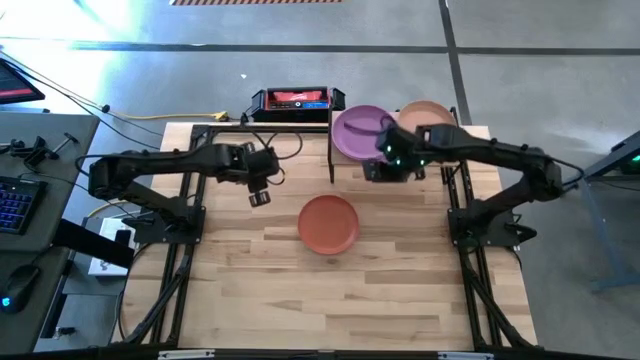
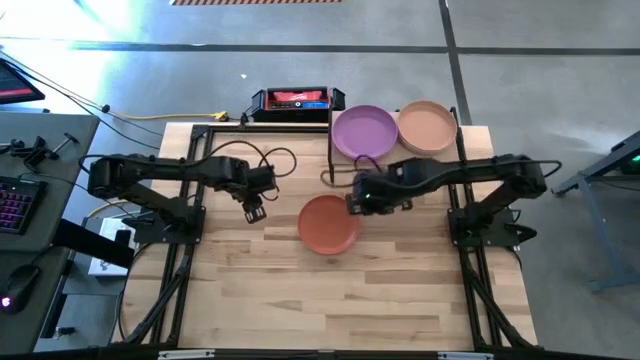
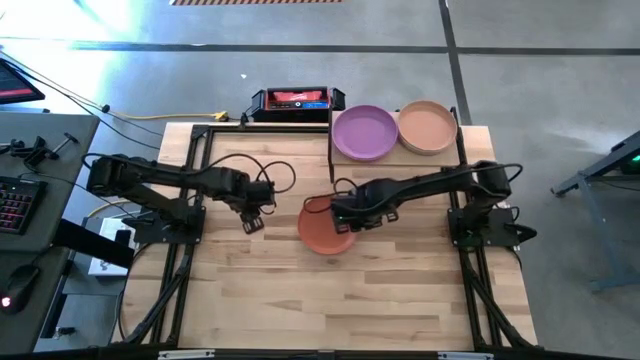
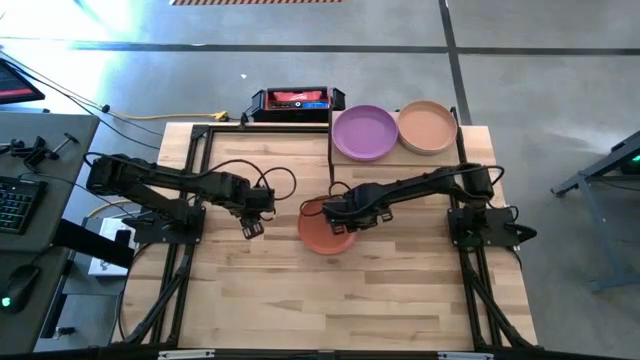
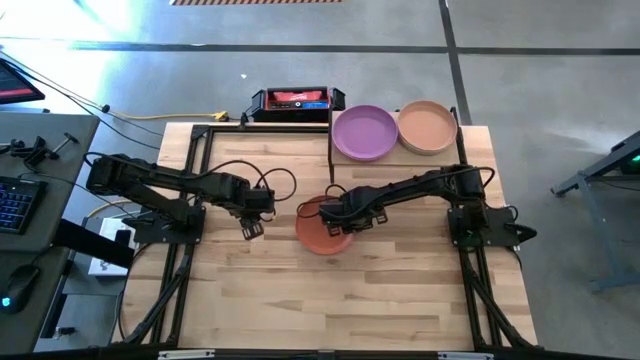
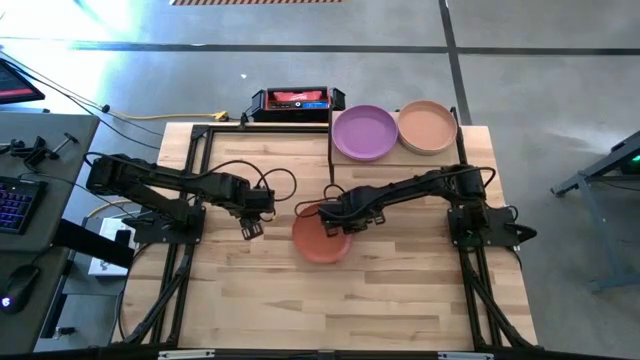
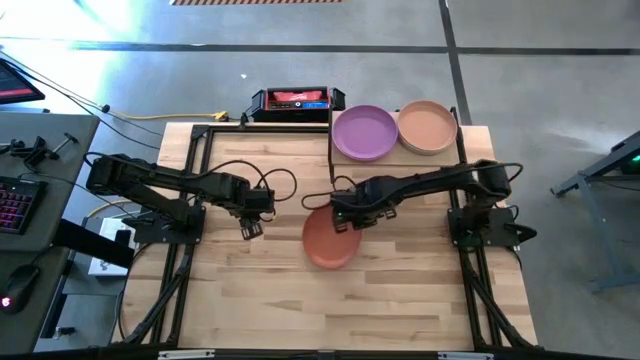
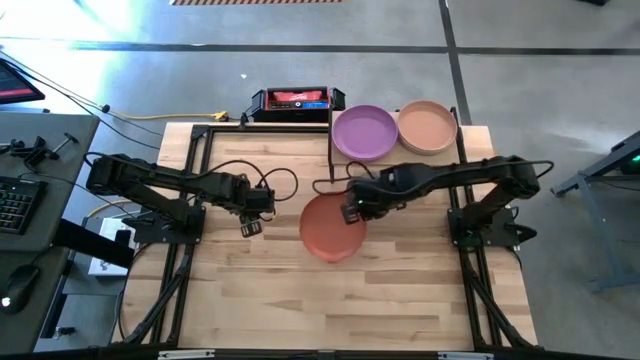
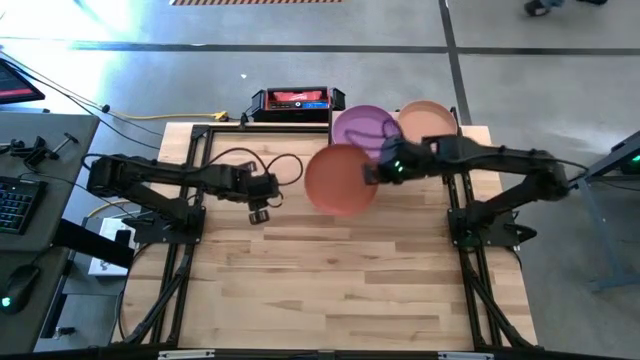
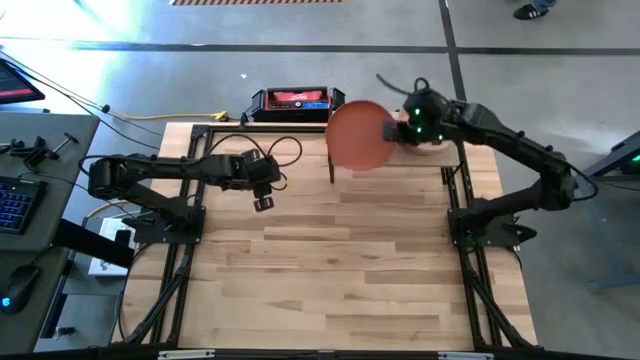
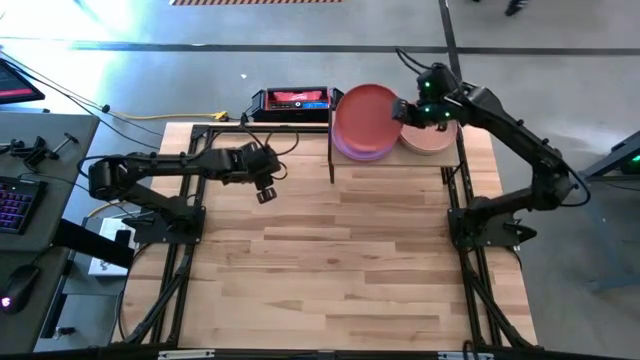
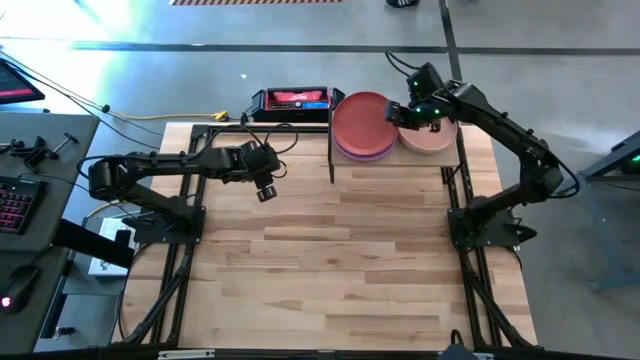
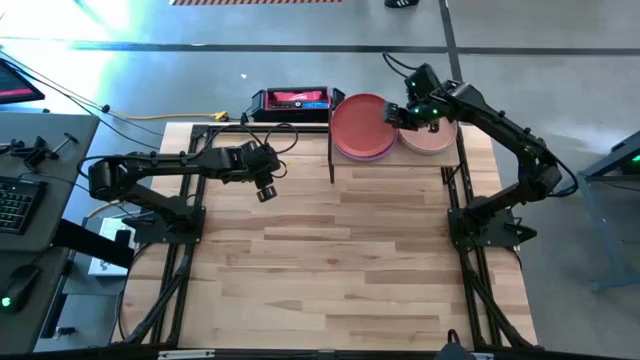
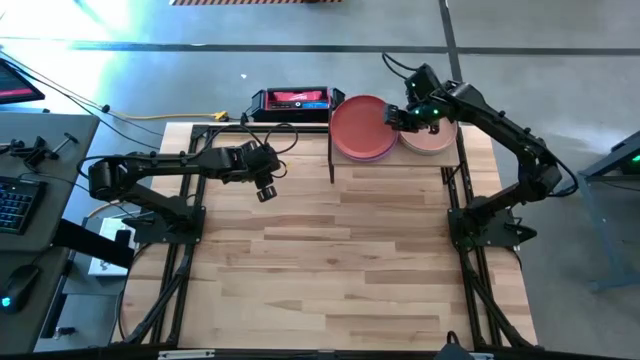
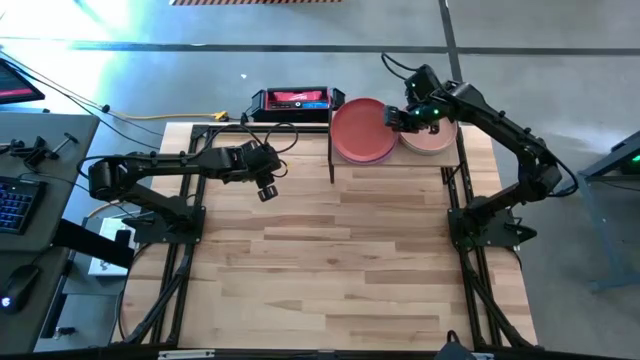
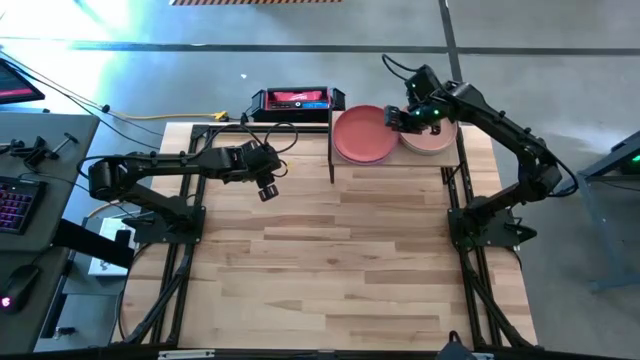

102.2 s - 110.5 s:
Task: Place and stack plates onto a shelf
Stack the orange plate on top of the violet plate on the shelf

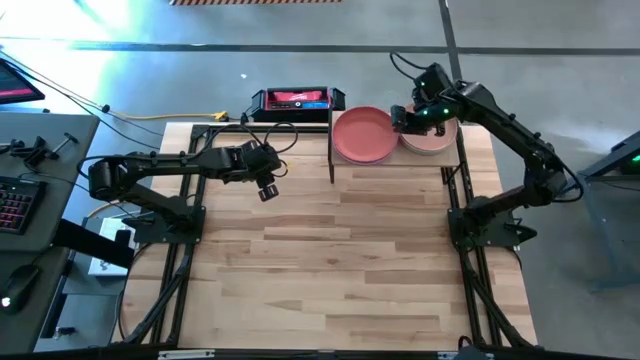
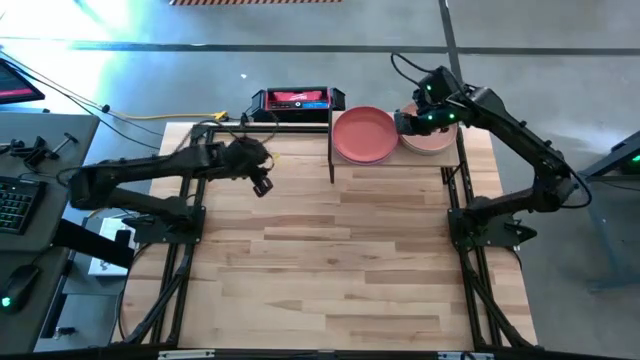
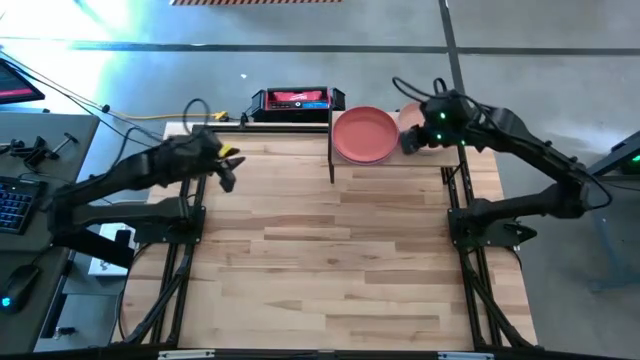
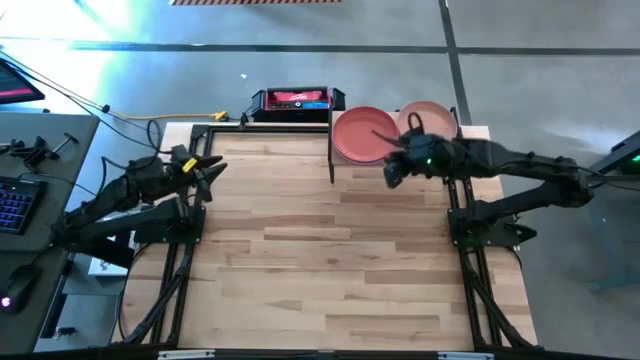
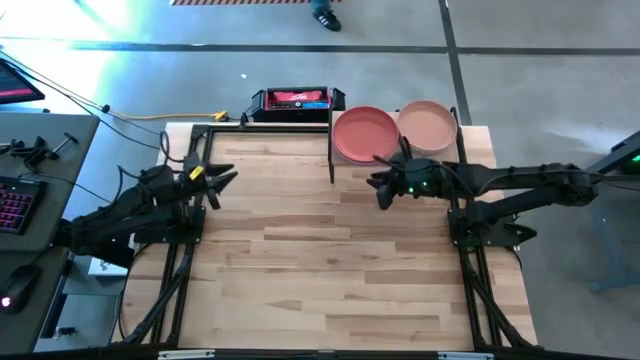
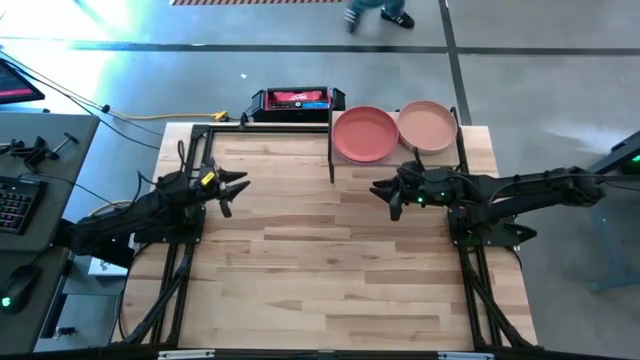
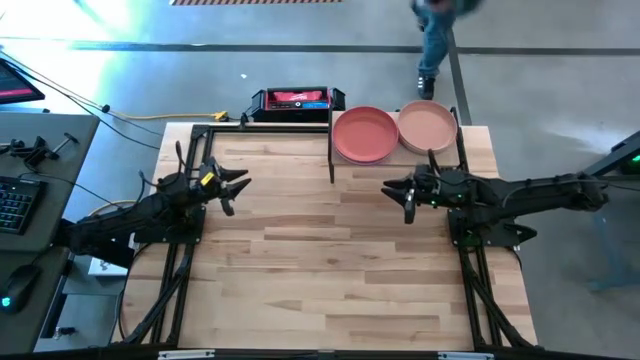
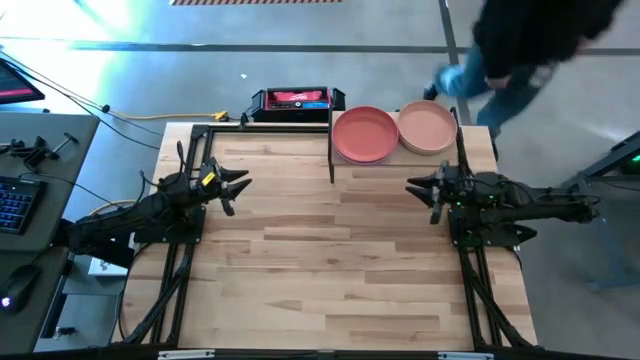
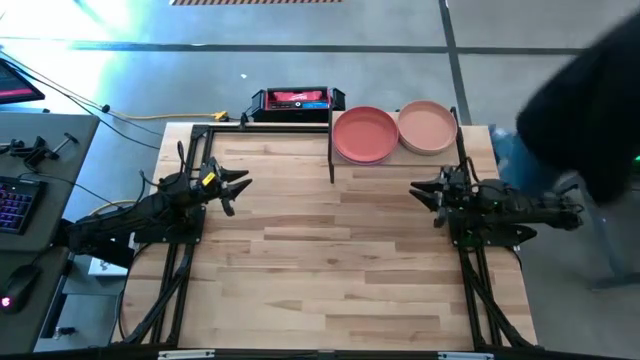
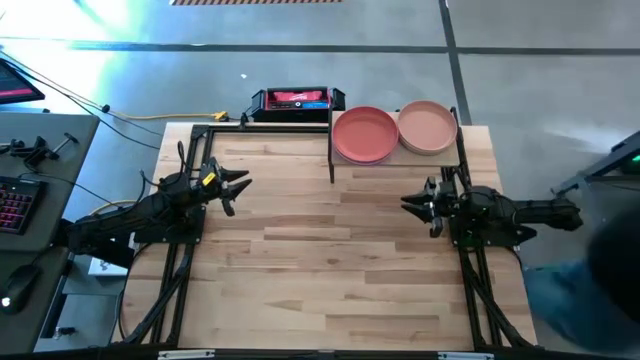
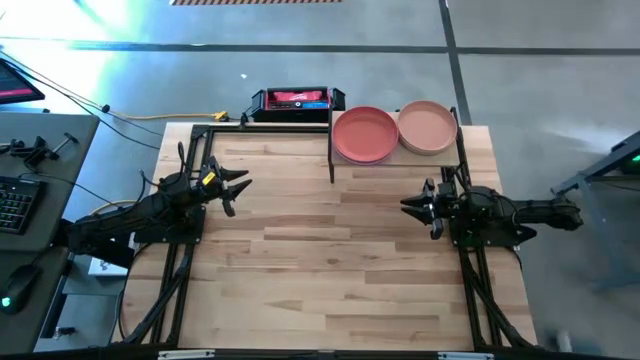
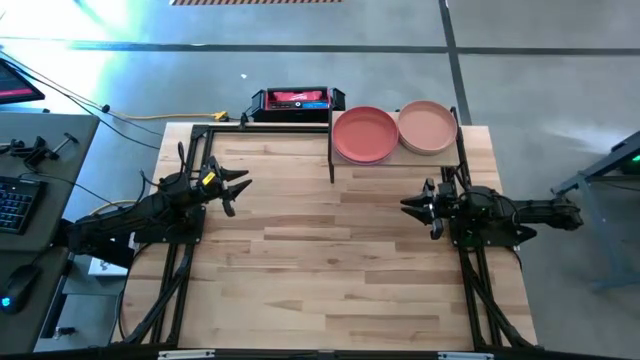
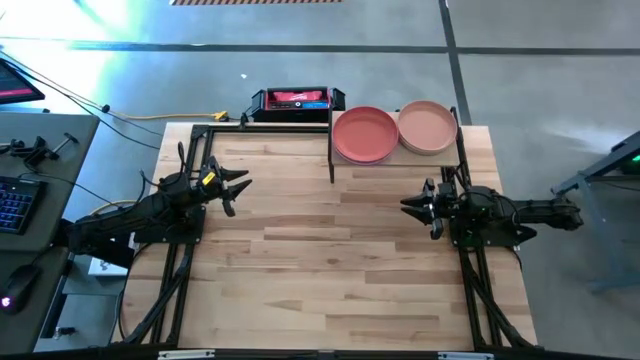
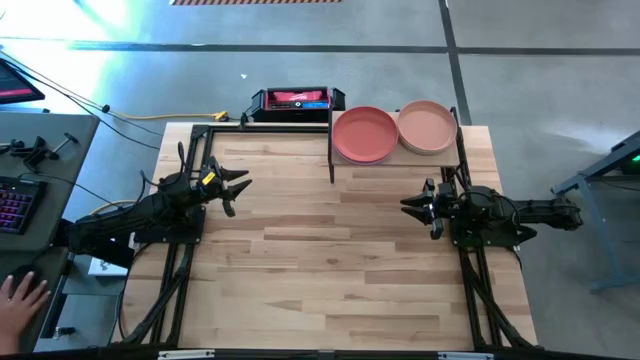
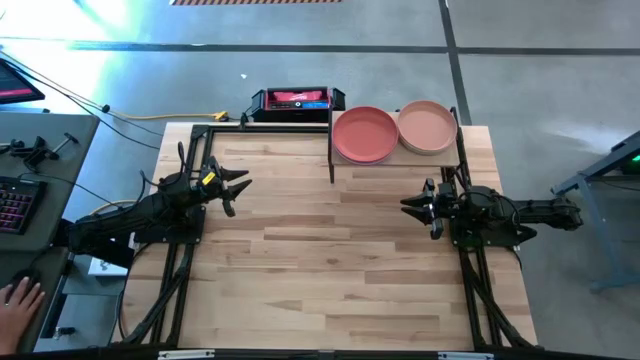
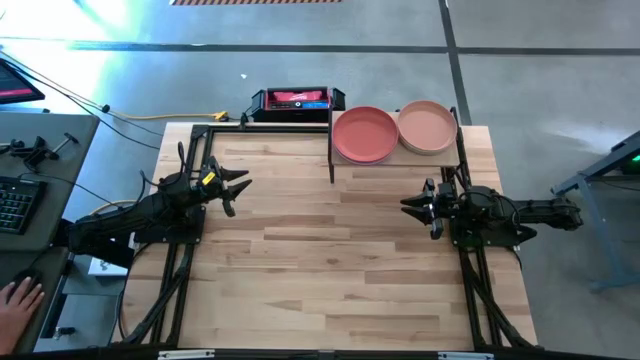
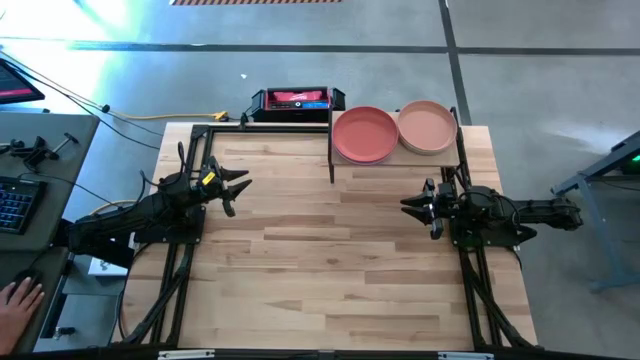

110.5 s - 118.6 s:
Return to Home Position

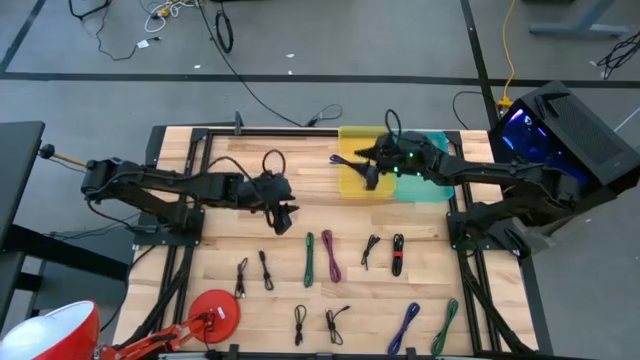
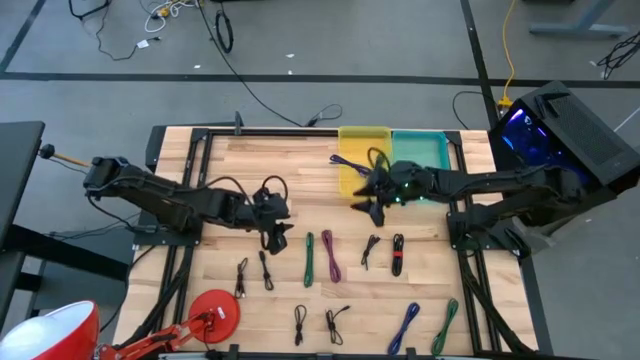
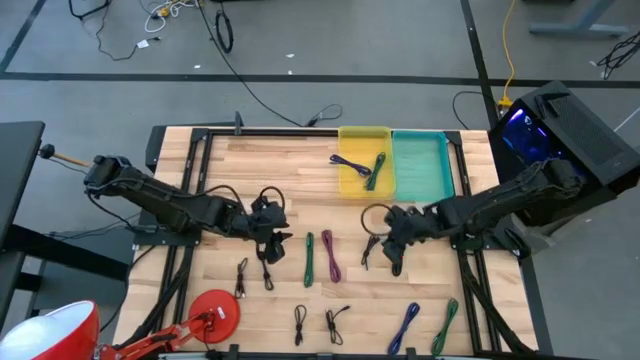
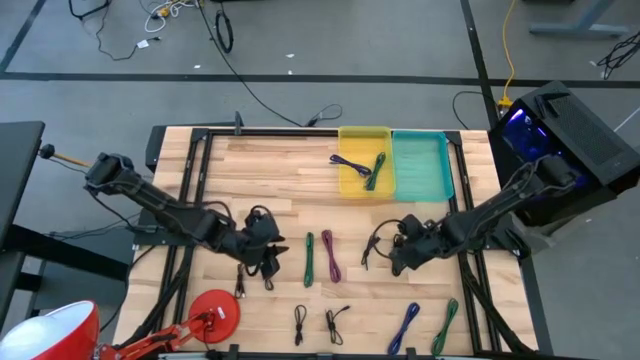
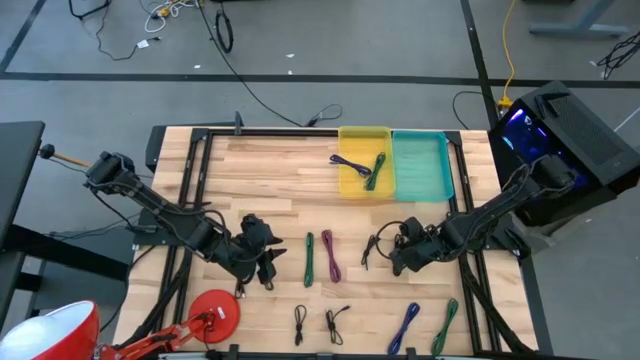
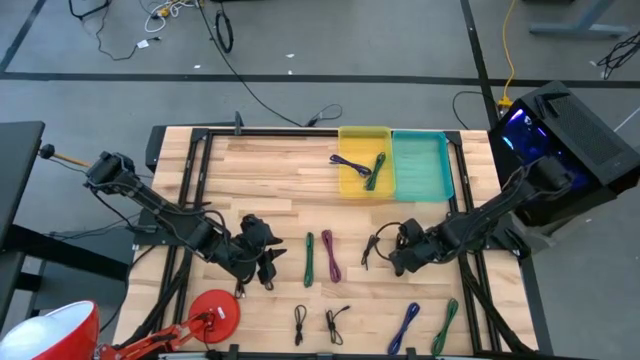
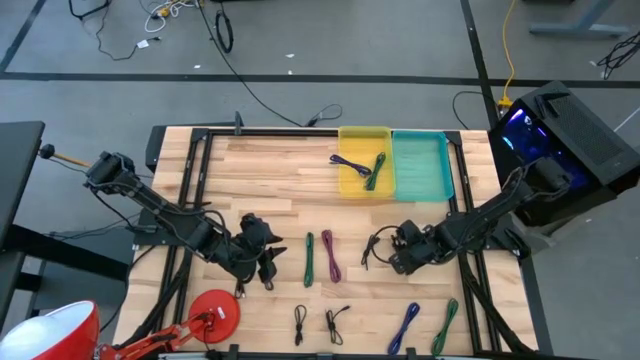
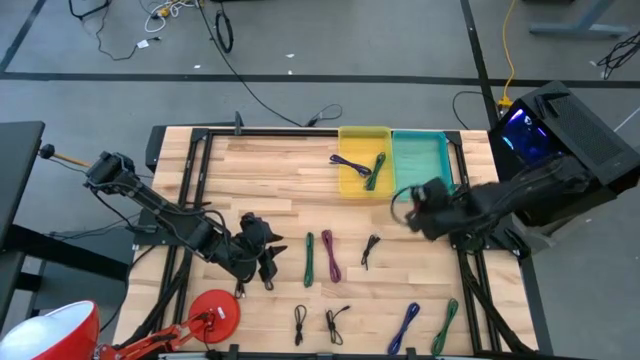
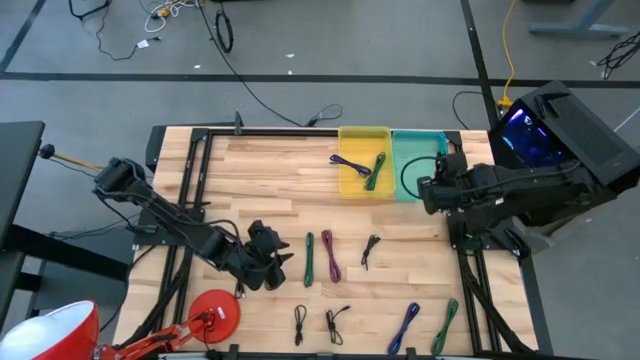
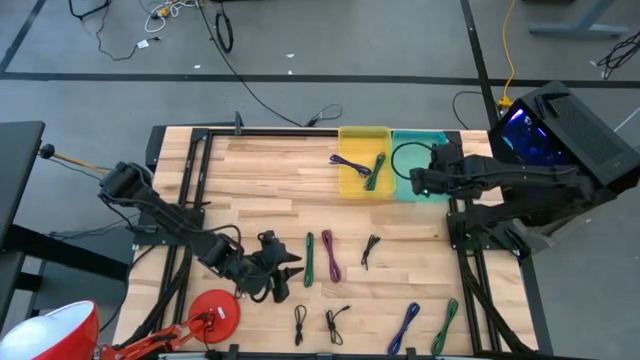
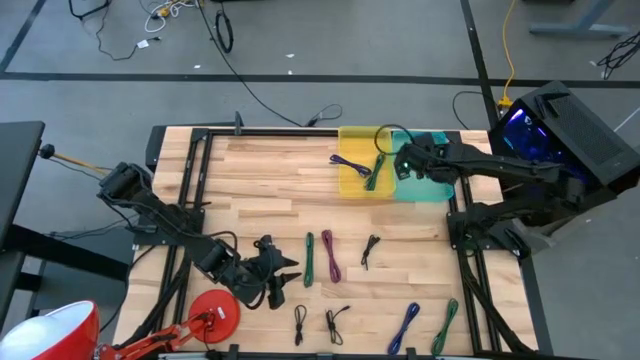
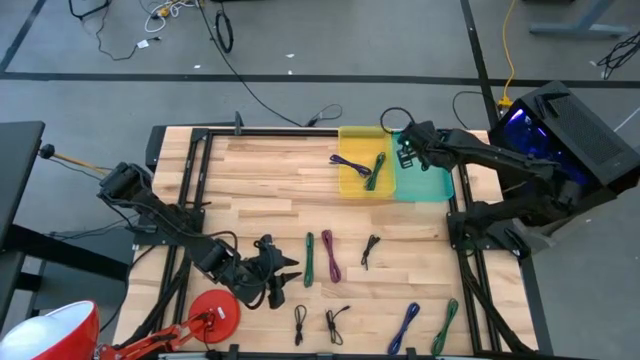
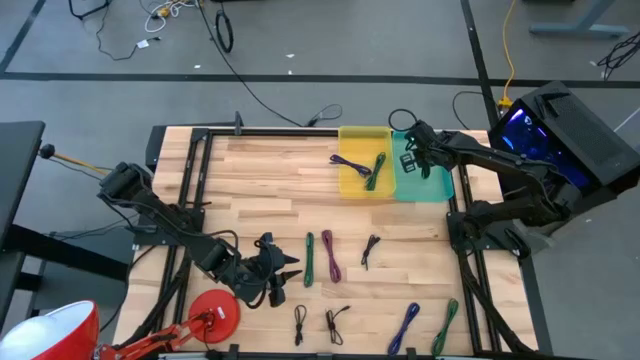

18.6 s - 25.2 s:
Task: Pick & Place USB Port
Put the black charger cable into the blue bin
